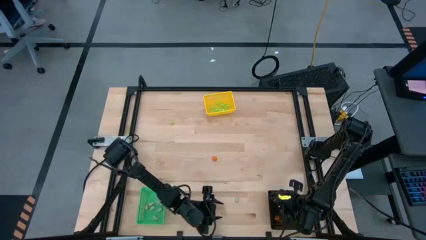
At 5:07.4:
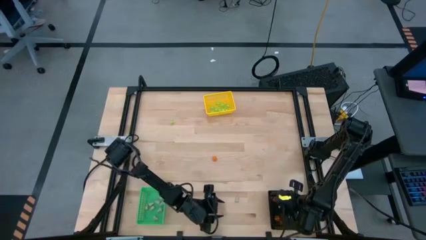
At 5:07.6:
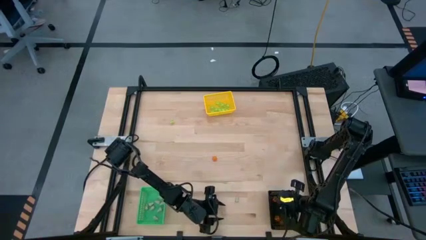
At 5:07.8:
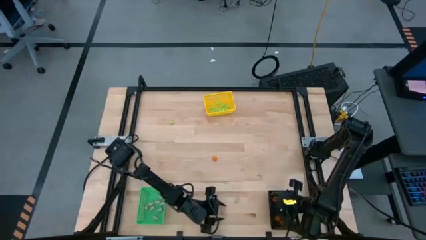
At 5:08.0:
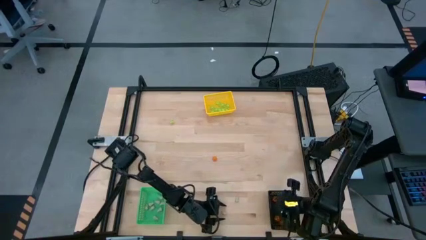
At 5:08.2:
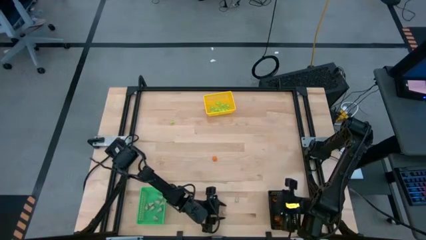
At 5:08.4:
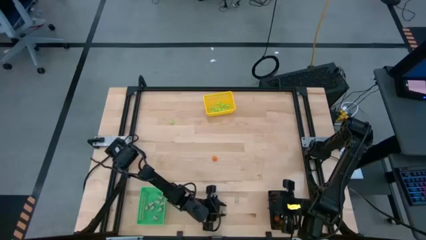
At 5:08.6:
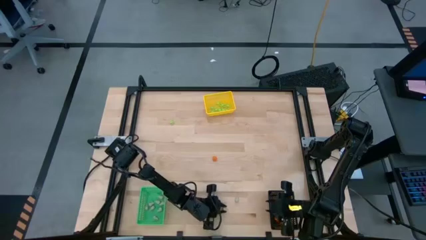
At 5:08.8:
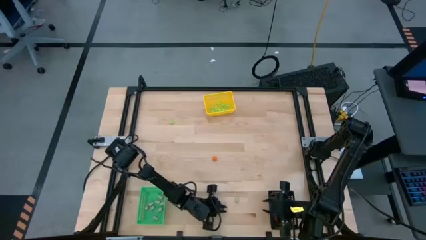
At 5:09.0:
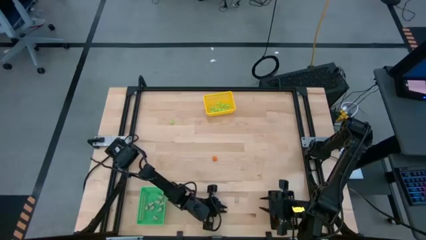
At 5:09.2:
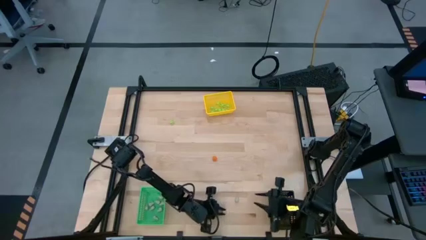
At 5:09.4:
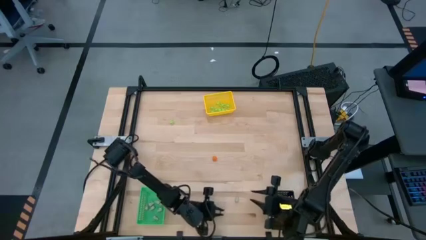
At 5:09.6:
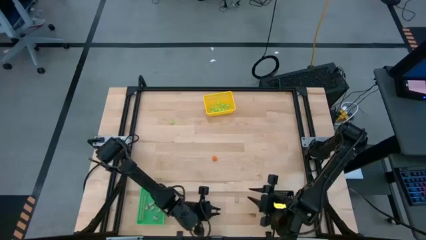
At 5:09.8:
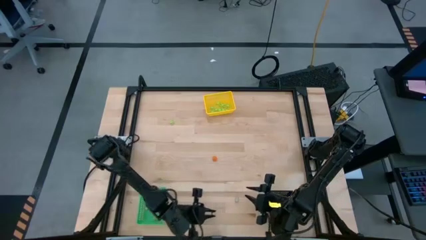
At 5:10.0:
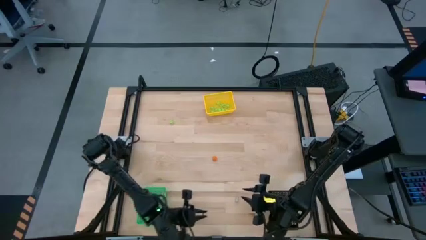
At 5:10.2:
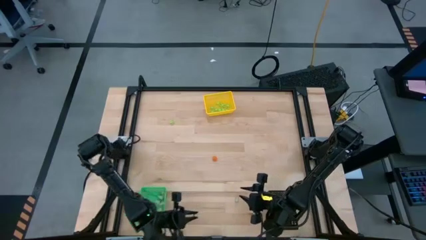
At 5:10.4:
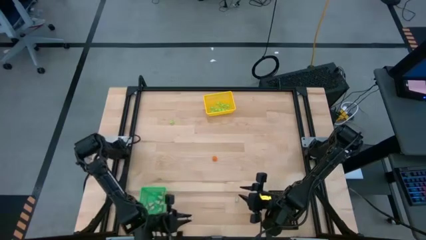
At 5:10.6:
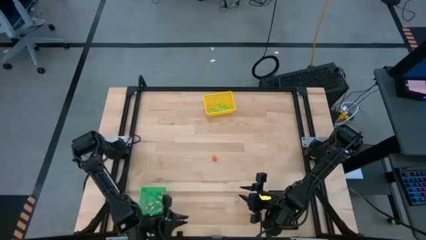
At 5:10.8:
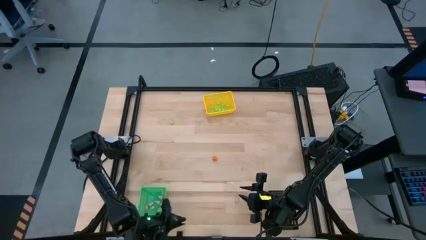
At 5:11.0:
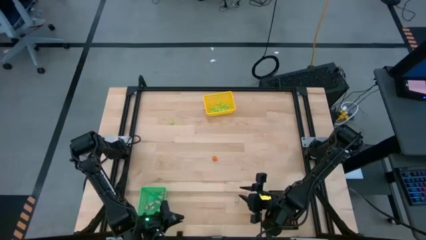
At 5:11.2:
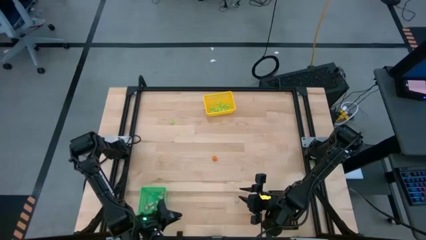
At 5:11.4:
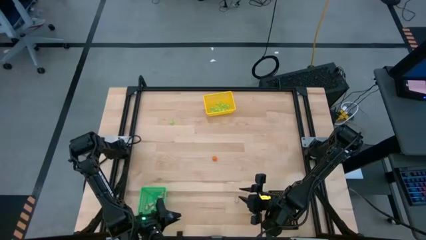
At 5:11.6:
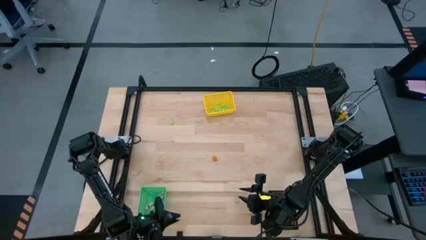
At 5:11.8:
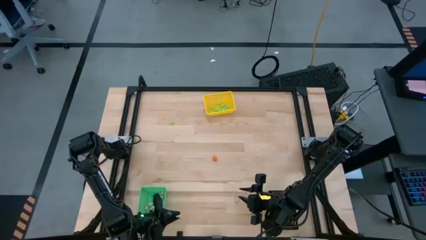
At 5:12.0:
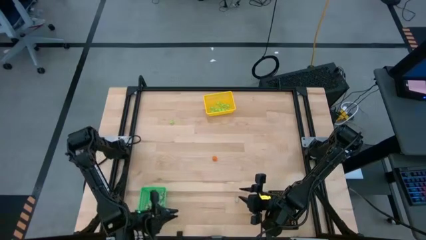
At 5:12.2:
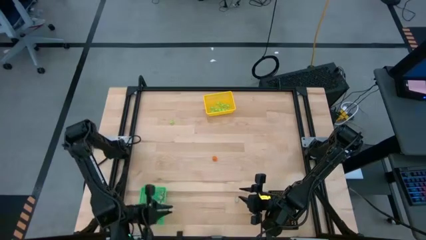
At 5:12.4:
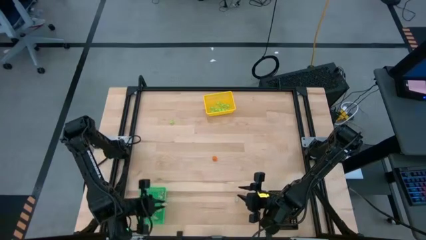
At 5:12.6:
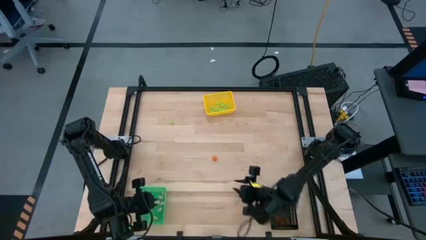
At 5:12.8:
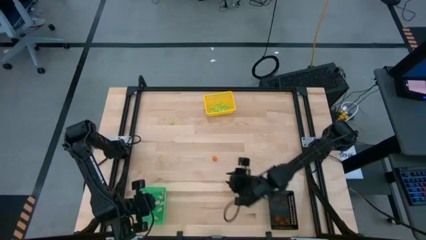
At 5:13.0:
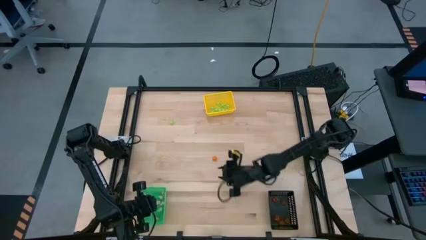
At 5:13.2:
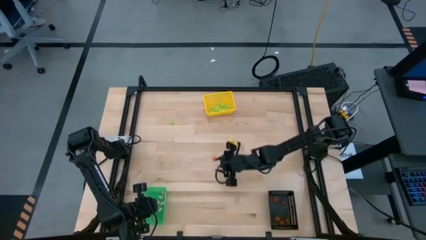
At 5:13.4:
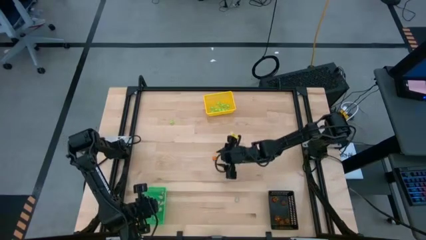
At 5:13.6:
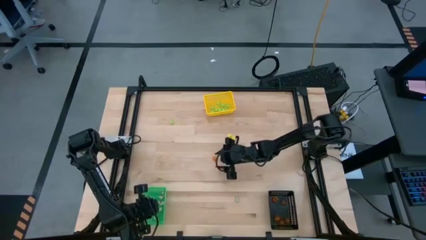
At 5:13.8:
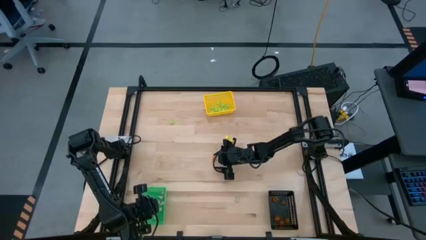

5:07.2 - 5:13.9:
Task: Sort Halloween decoration
Put the white skull toy into the green bin

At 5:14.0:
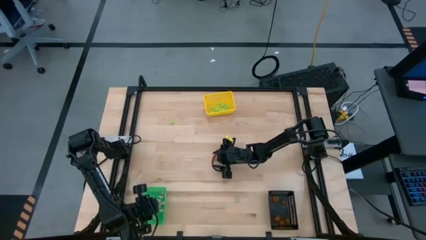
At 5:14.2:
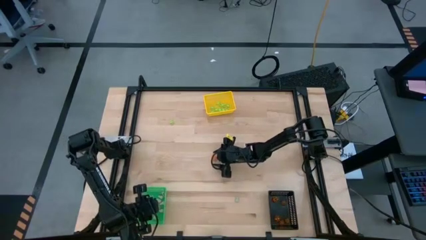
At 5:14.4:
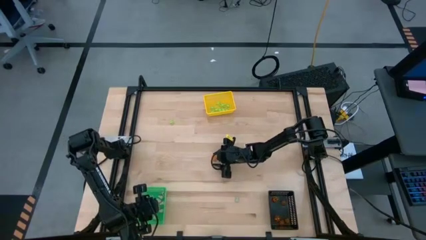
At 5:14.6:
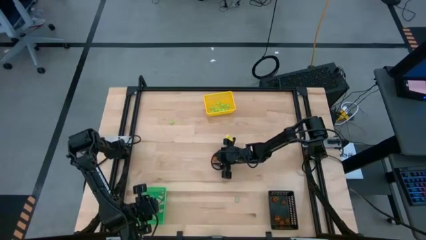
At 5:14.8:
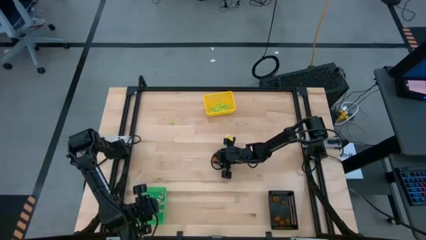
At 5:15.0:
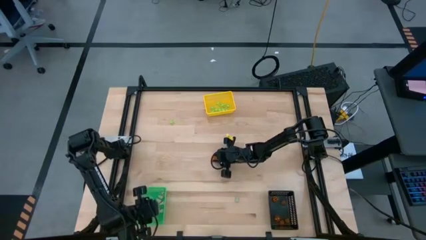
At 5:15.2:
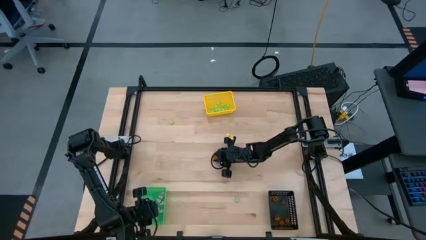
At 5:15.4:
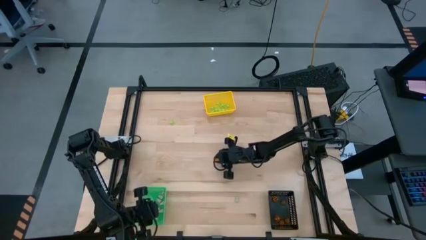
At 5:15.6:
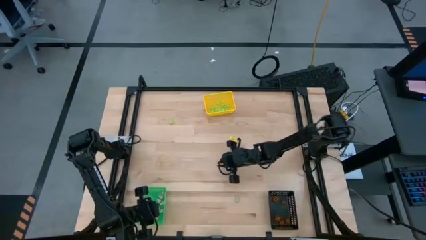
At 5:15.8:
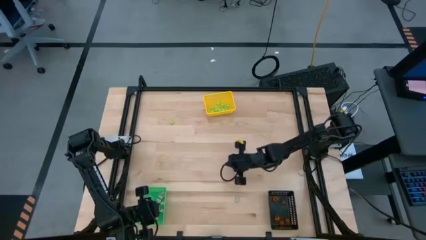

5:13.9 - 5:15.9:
Put the orange pumpkin toy into the black bin

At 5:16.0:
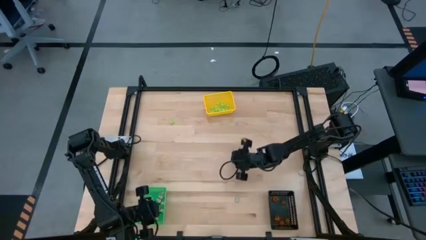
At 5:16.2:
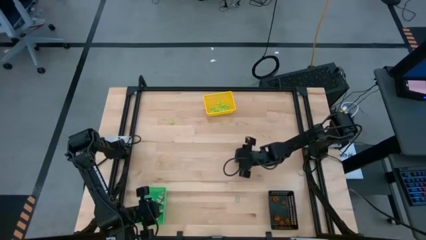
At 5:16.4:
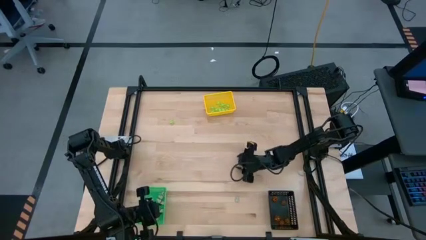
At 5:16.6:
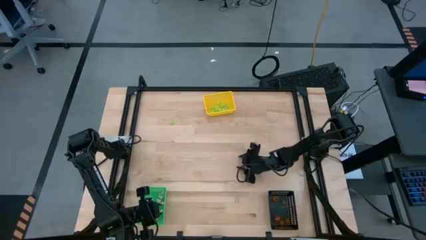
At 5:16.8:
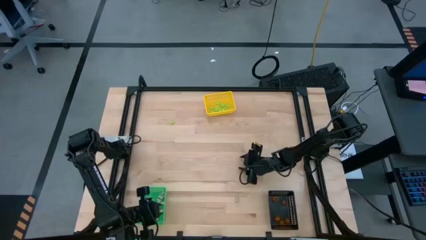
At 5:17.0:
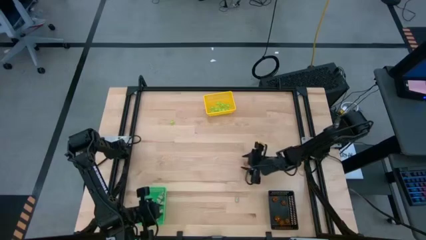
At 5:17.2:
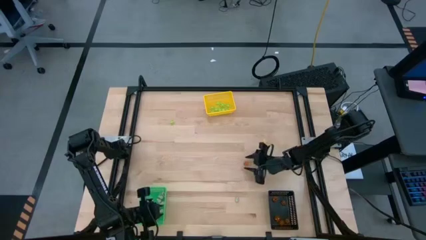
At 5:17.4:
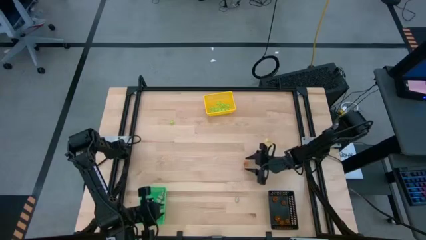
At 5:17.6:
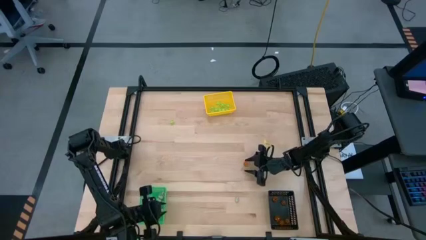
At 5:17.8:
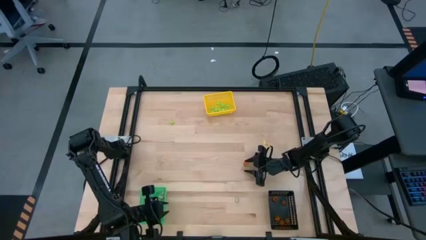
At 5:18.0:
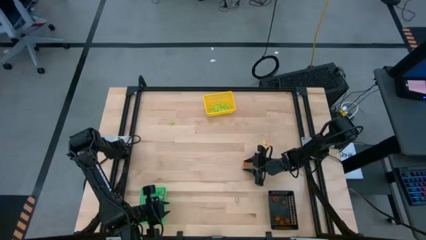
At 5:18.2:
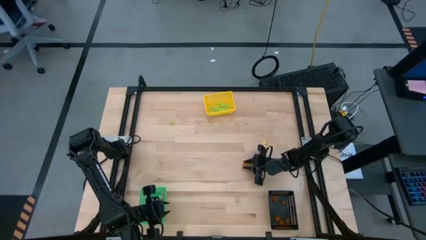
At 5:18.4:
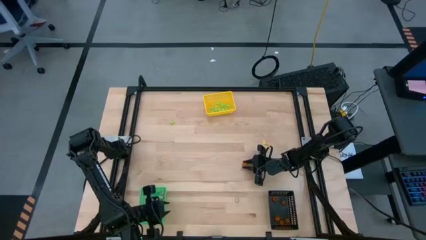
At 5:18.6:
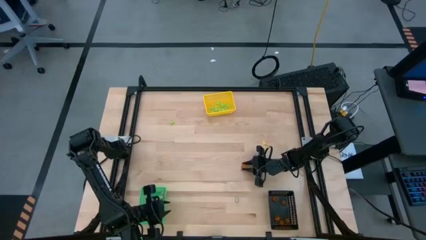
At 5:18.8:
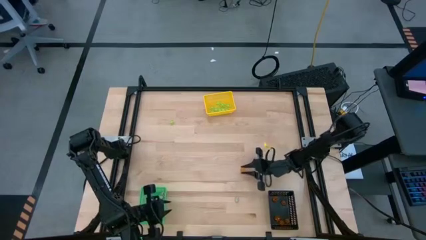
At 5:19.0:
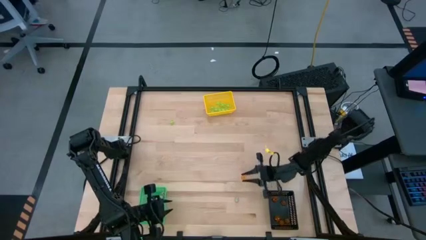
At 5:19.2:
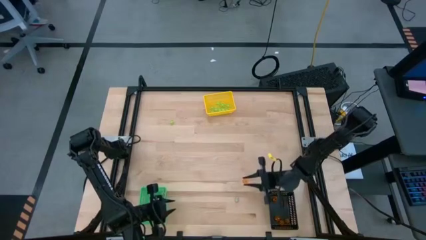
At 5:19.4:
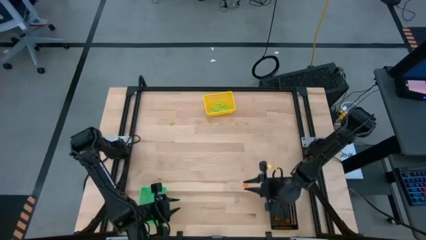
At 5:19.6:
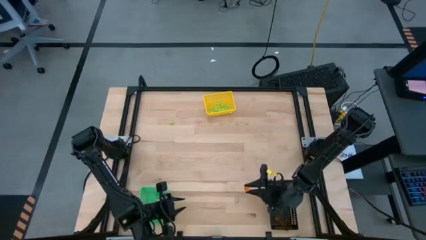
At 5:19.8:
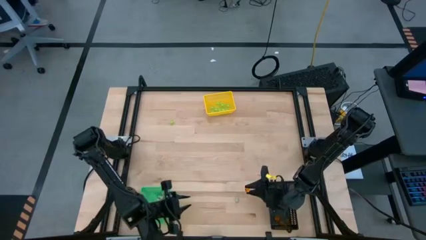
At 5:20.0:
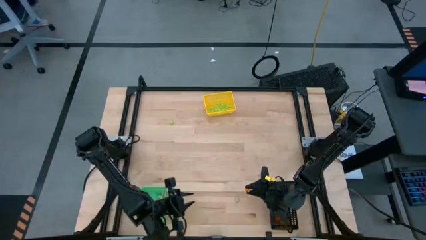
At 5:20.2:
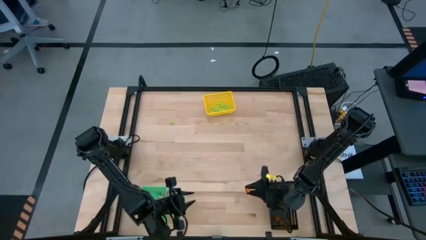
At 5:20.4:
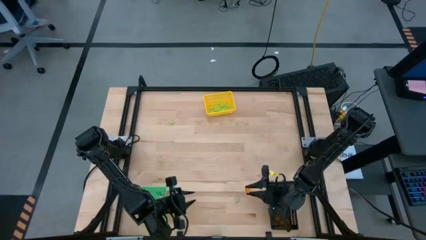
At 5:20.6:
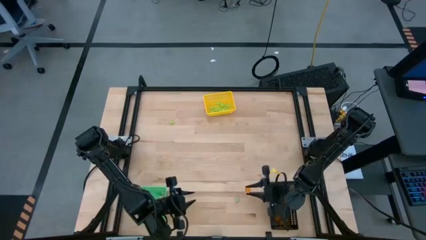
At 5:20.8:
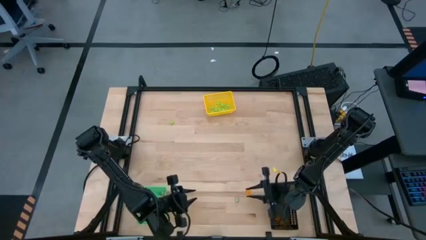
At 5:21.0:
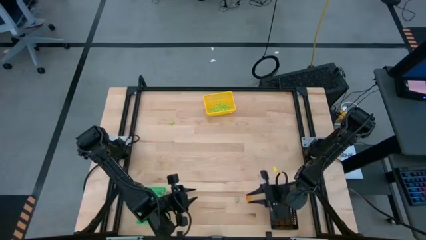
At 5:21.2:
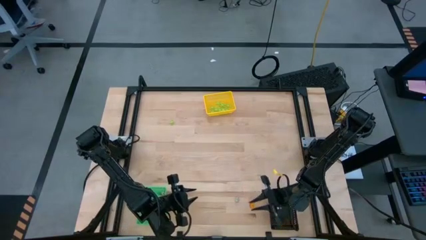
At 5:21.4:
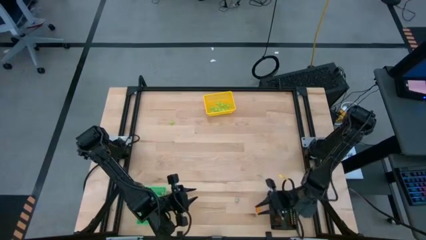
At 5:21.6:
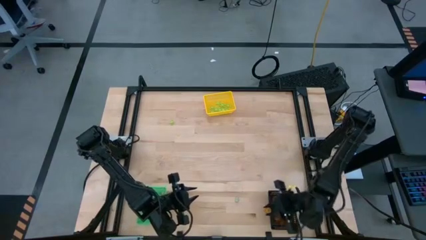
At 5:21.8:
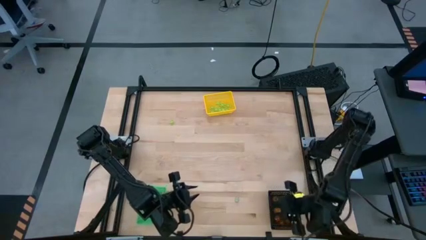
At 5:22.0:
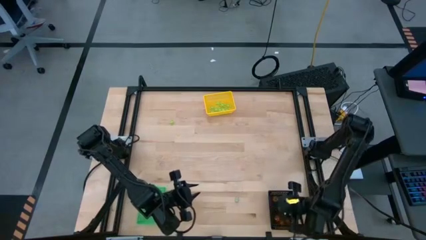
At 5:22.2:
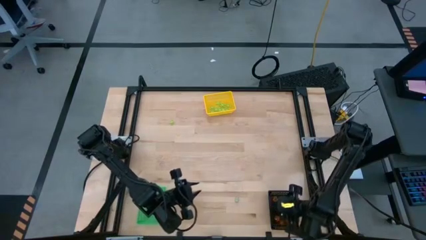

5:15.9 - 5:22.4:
Put the orange pumpkin toy into the black bin
